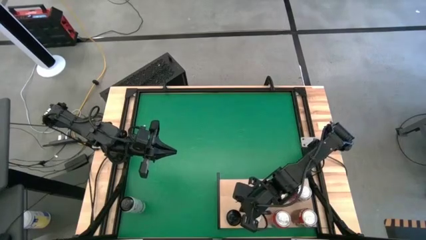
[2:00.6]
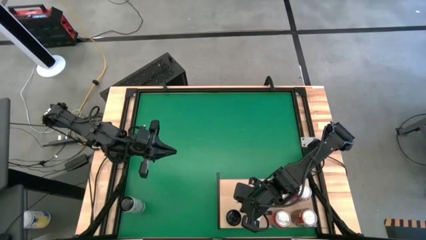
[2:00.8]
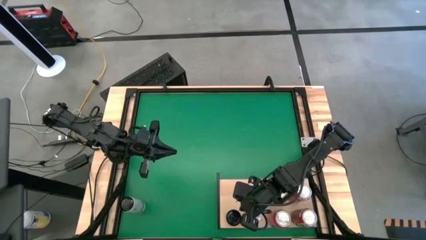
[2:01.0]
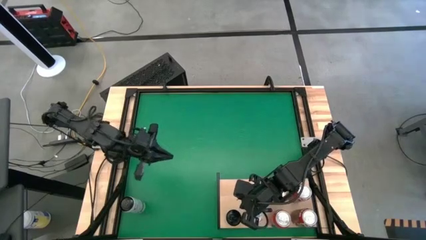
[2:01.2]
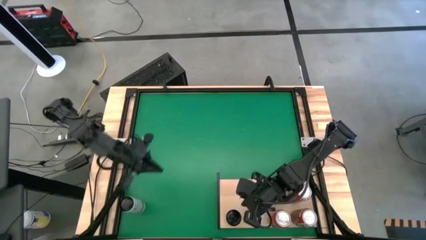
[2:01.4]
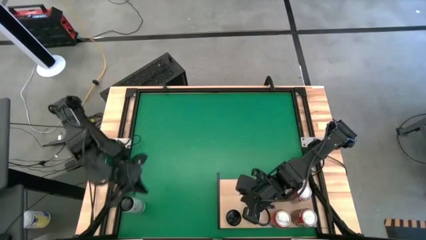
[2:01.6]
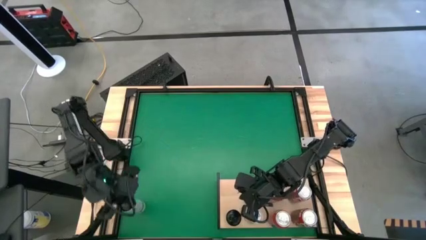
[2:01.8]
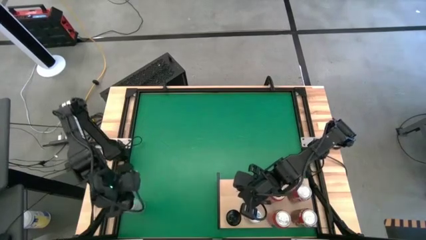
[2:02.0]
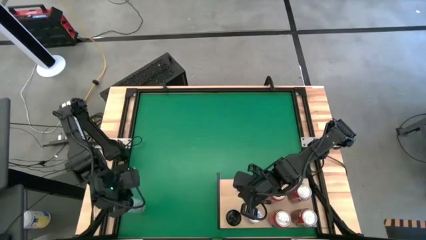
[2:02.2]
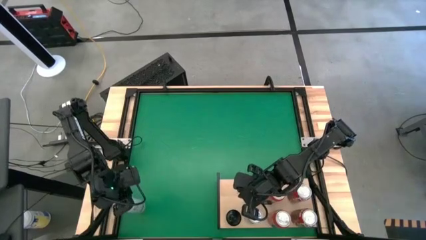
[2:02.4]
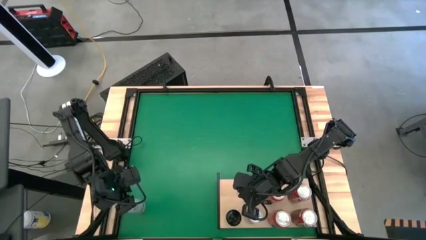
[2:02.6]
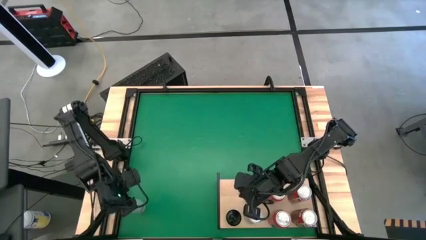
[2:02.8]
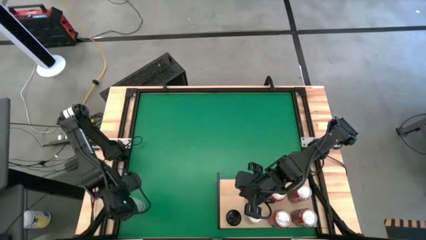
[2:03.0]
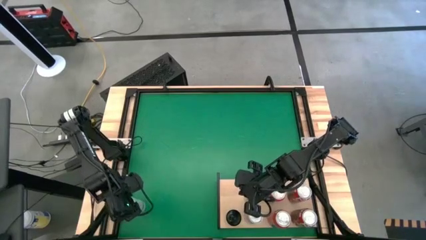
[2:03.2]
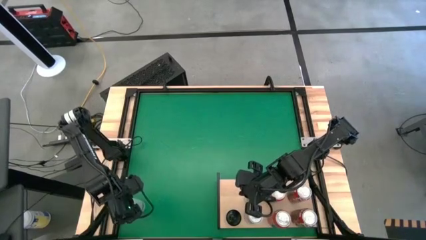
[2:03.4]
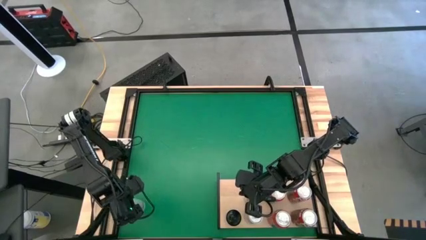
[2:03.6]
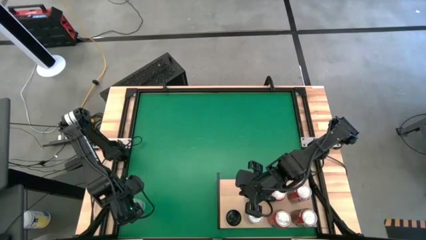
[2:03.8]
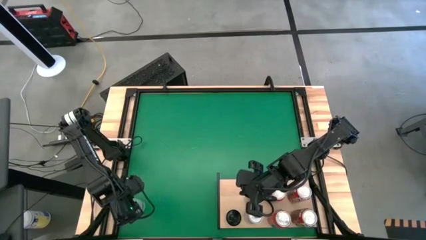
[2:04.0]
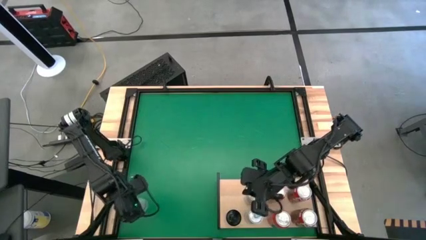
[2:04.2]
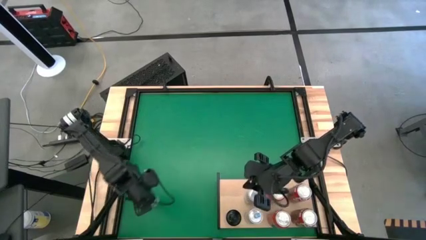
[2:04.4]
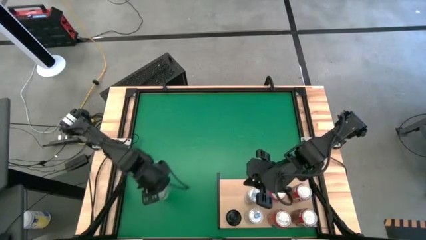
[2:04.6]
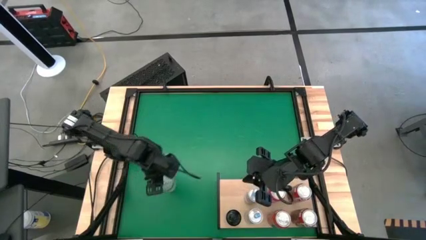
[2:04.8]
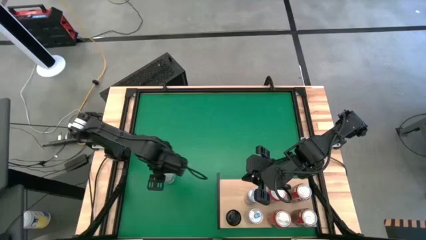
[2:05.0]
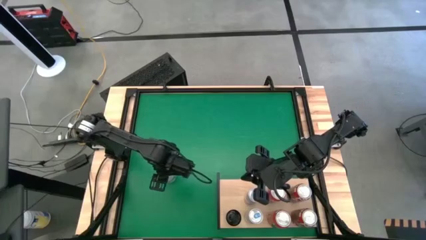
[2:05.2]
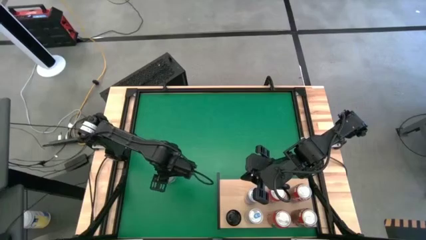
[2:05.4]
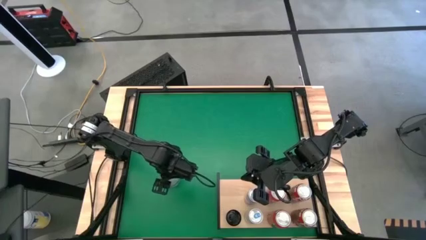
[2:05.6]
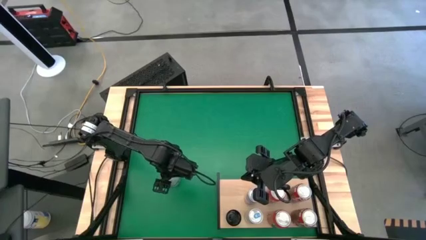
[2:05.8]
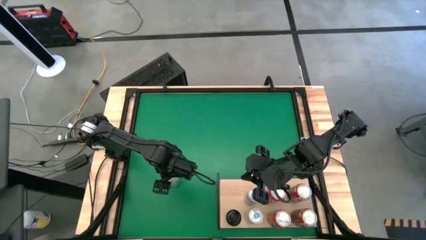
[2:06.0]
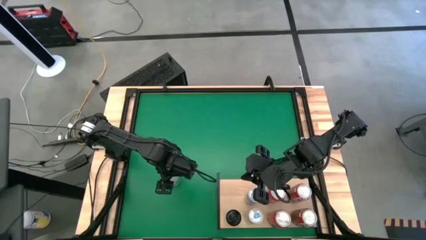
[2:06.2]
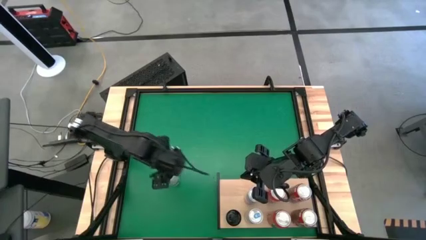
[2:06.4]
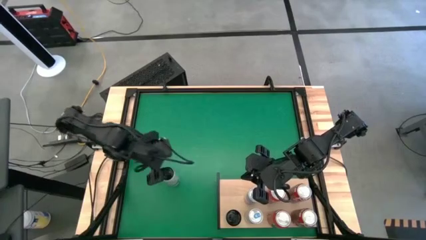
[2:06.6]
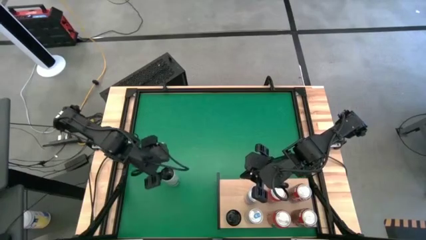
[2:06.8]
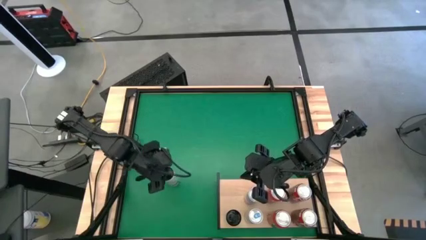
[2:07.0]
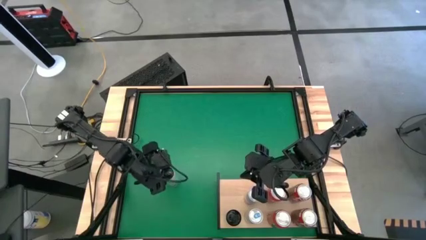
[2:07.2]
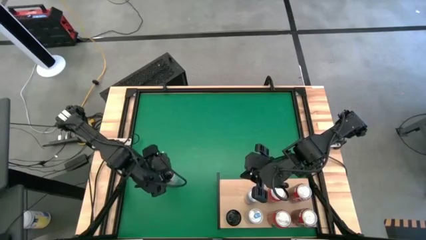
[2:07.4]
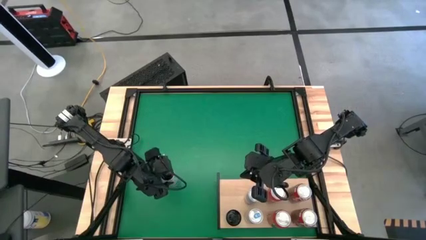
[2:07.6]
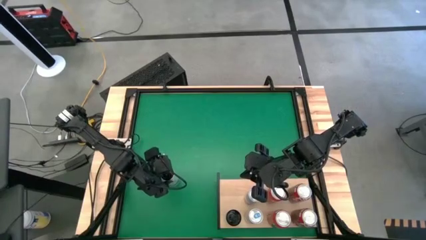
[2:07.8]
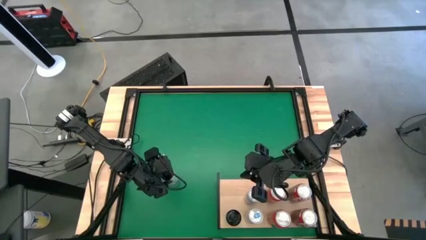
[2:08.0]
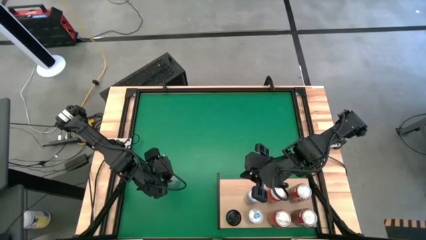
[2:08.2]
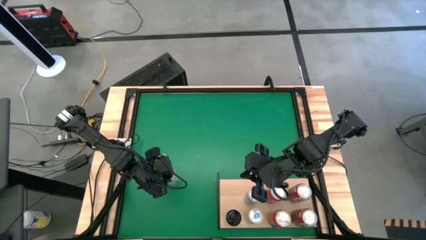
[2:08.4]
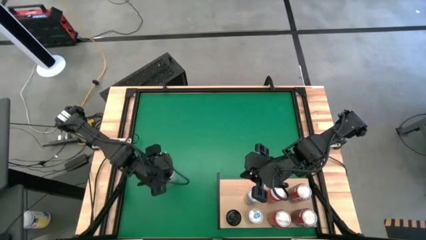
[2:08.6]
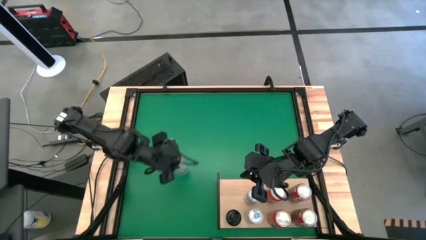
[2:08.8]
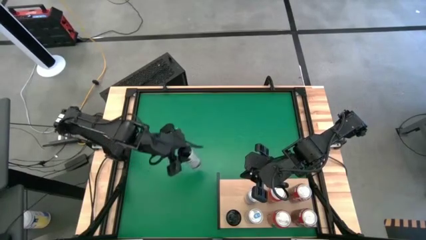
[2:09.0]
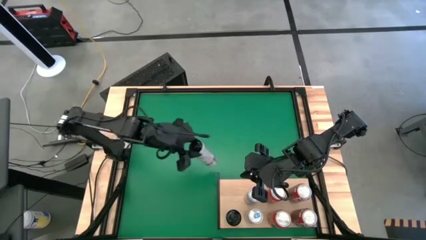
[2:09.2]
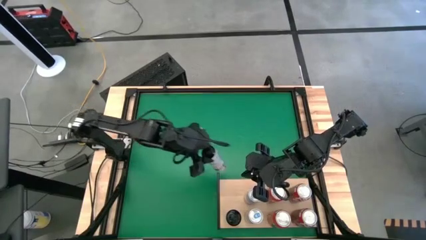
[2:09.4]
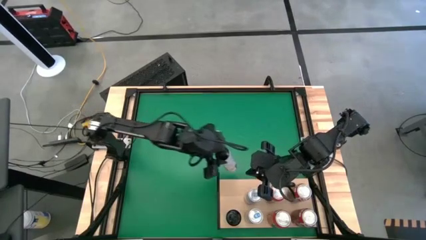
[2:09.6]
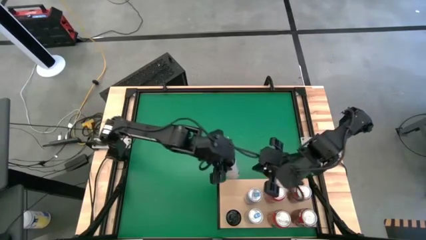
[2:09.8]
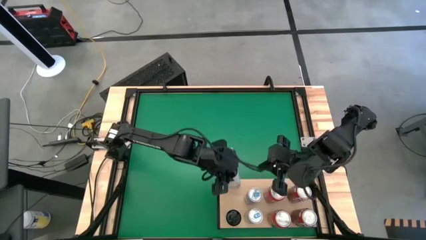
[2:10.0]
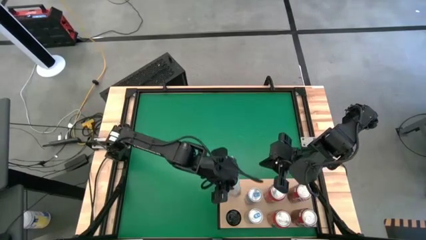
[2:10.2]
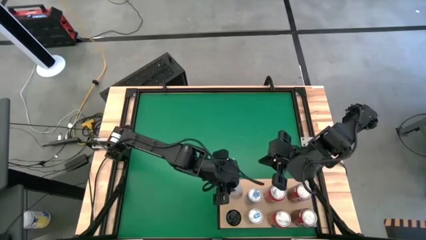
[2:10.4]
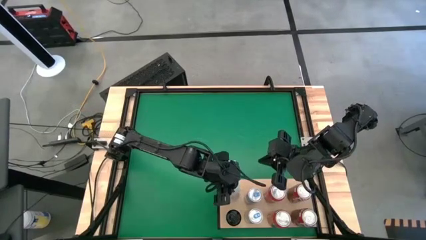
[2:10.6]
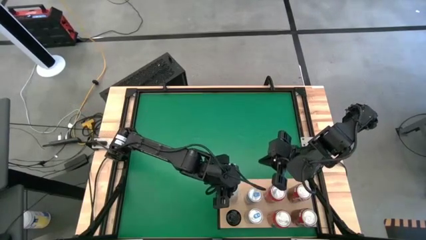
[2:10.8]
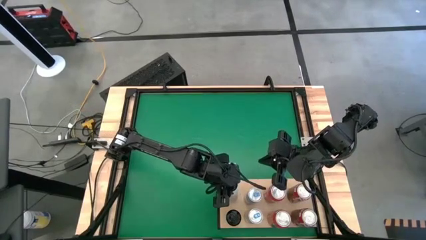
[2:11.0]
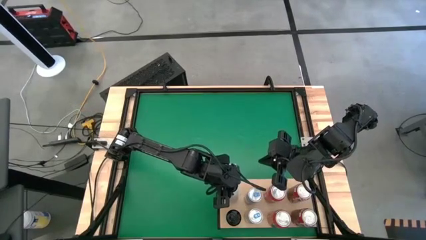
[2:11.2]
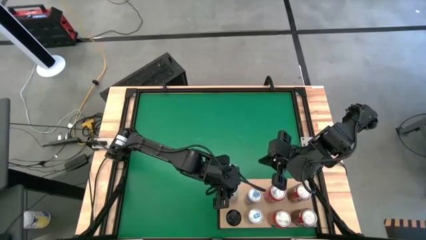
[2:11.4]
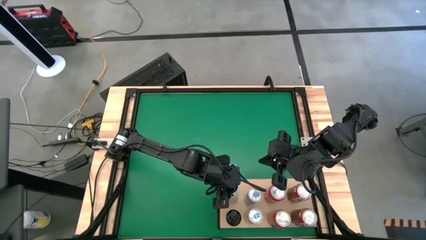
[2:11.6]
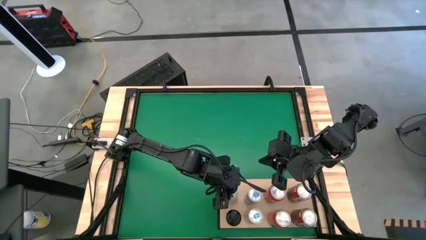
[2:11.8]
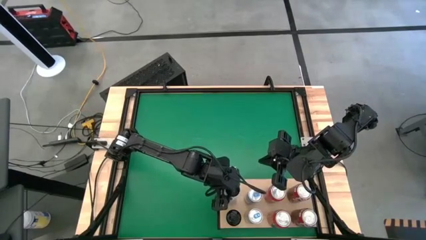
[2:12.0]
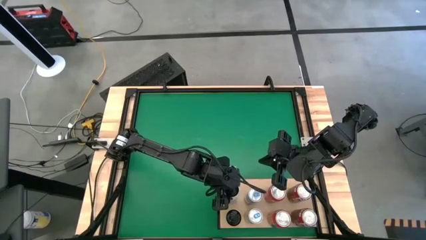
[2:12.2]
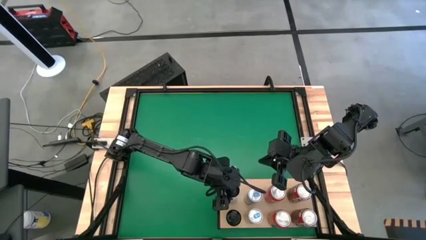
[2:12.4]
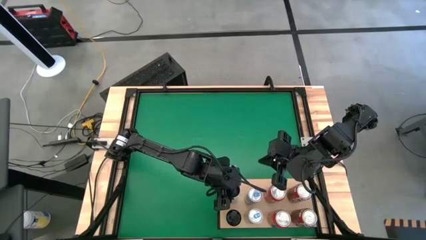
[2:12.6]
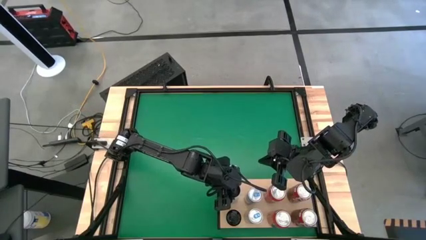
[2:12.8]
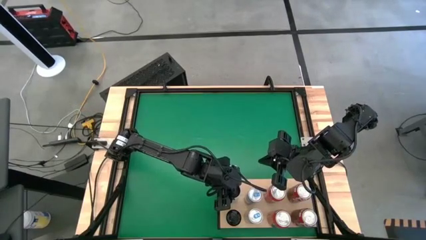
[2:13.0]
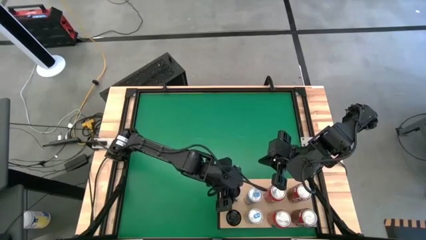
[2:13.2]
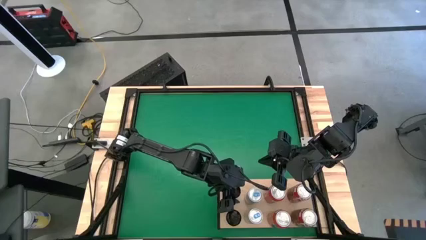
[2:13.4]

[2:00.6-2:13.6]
Task: Place canned beverage on shelf
Put the white yellow soda can on the shelf aligned with the other white yellow soda can

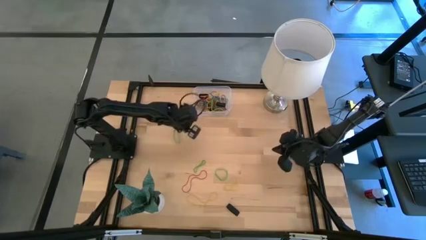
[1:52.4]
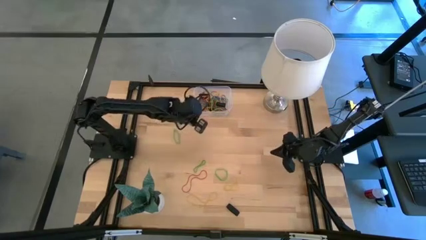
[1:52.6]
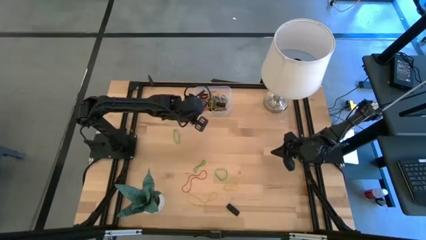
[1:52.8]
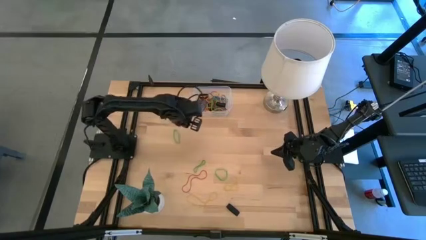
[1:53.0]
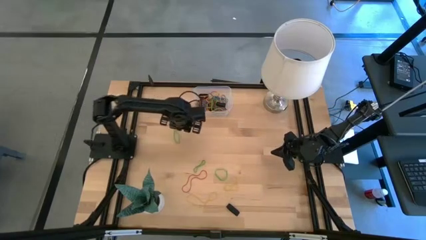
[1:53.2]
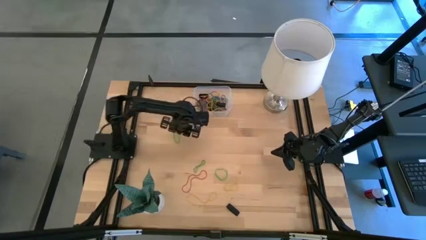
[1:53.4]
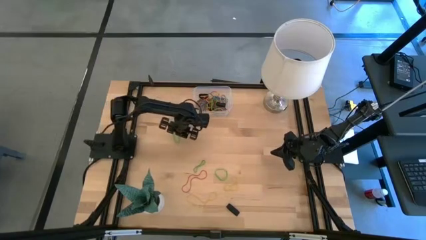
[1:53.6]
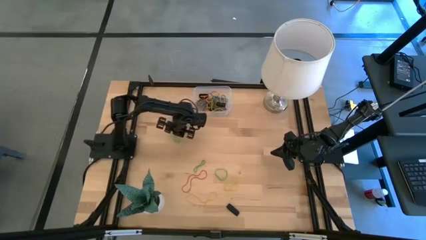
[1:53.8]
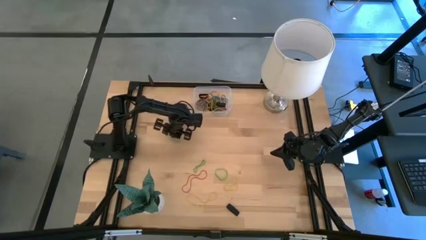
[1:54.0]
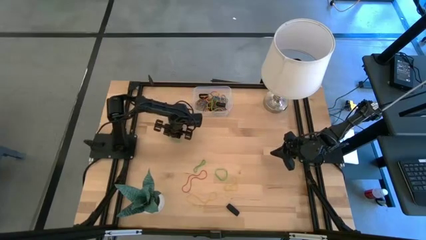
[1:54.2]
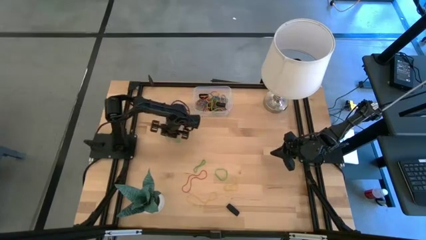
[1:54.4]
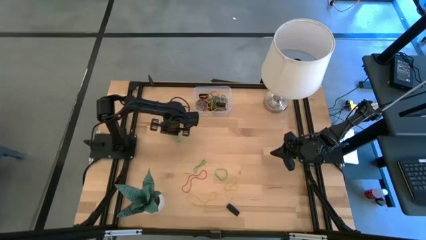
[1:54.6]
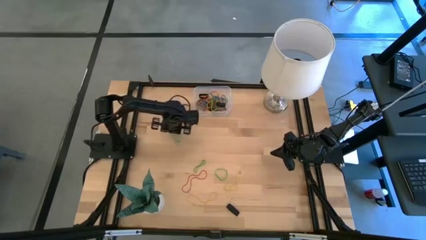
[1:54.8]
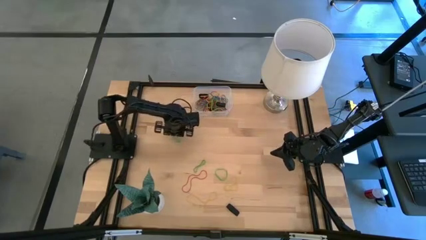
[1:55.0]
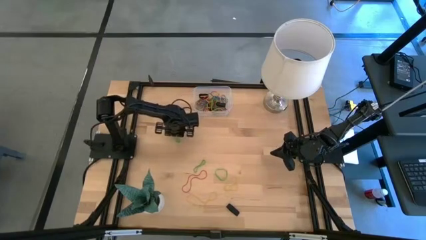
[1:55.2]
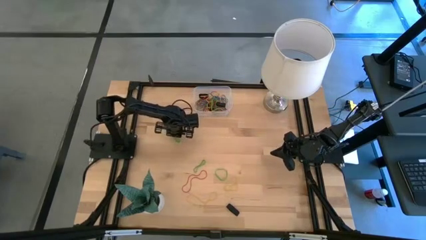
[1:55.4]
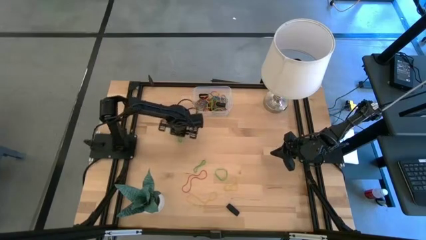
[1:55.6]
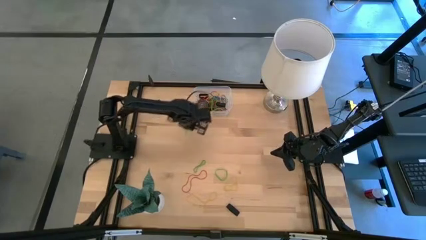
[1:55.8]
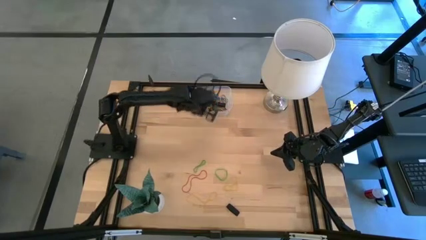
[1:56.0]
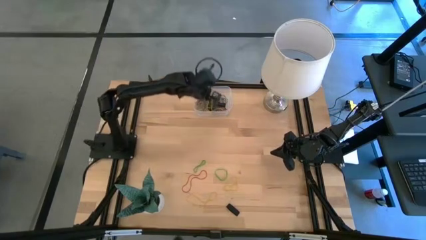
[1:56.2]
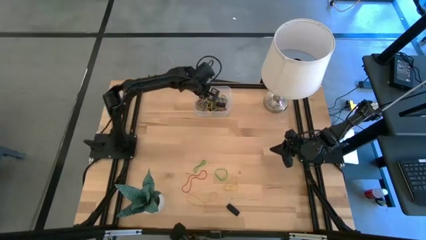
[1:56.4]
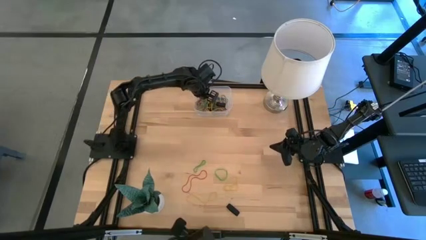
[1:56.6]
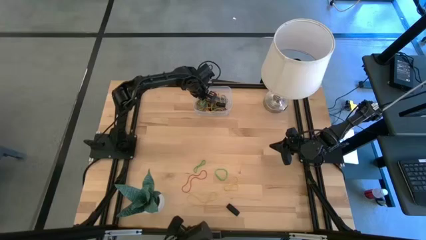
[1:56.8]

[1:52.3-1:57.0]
Task: Pick and place rubber bands into bin
Put the green rubber band into the transparent bin
